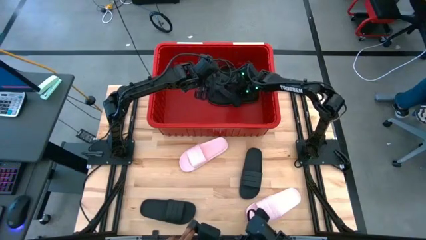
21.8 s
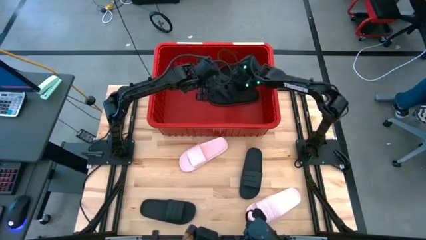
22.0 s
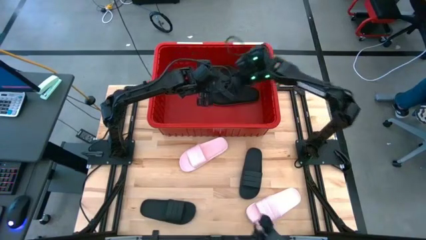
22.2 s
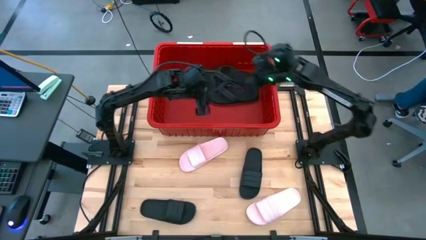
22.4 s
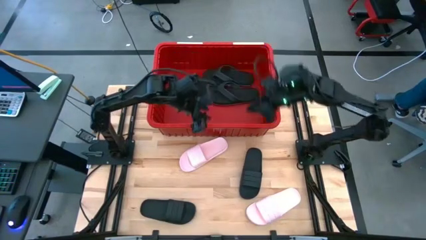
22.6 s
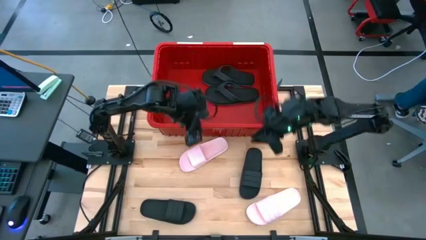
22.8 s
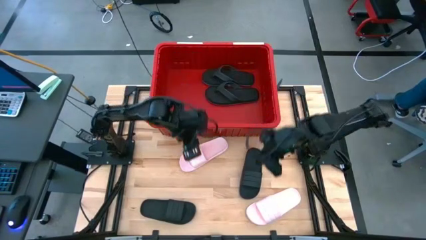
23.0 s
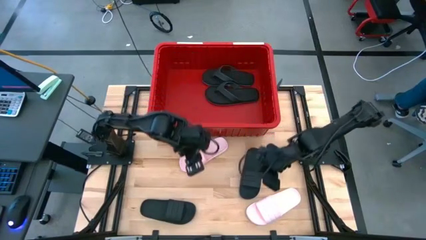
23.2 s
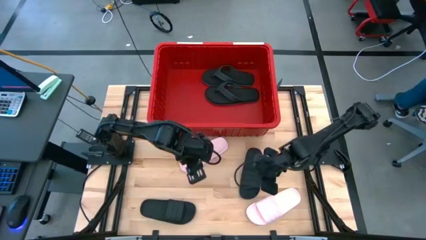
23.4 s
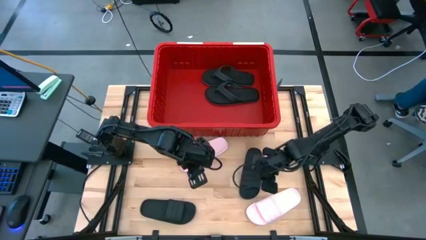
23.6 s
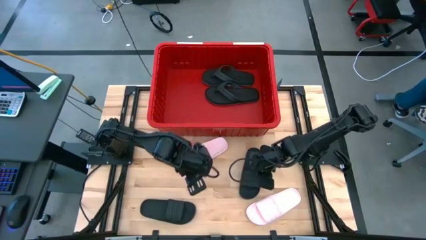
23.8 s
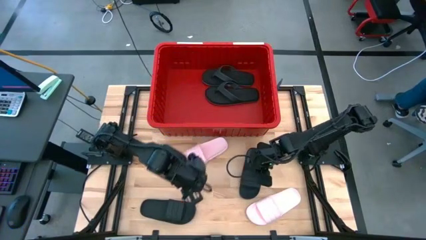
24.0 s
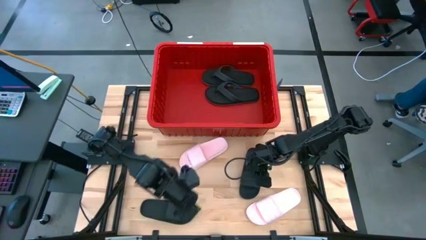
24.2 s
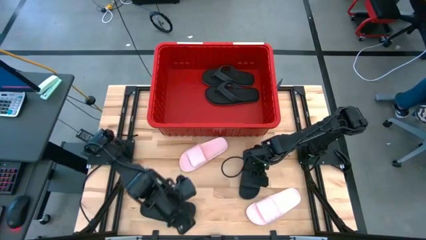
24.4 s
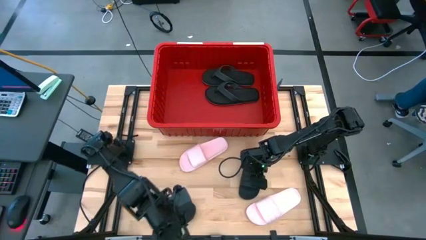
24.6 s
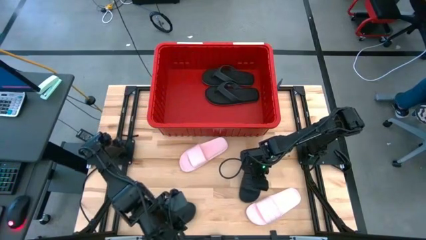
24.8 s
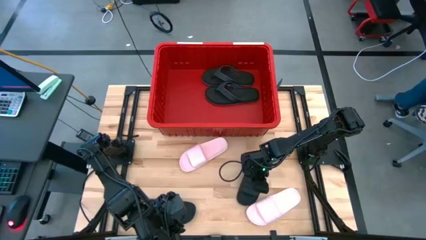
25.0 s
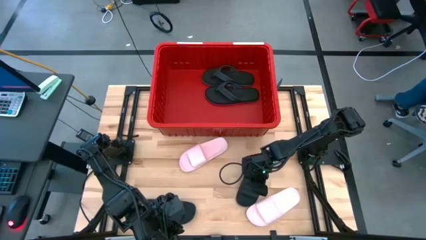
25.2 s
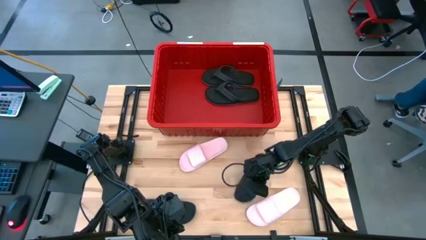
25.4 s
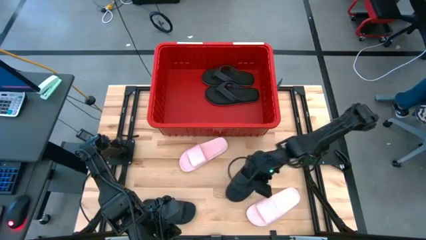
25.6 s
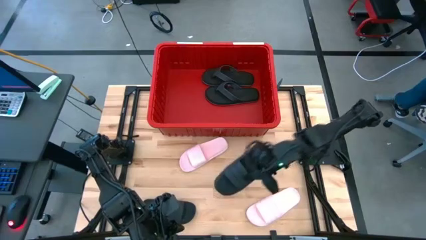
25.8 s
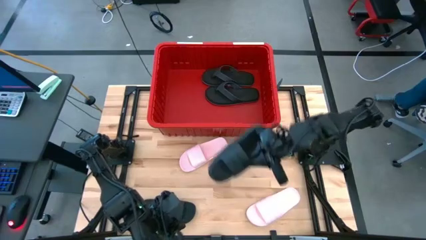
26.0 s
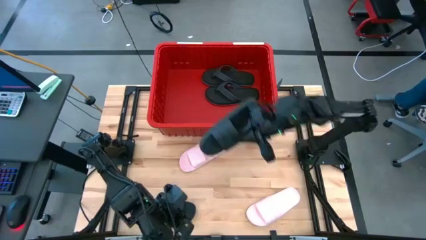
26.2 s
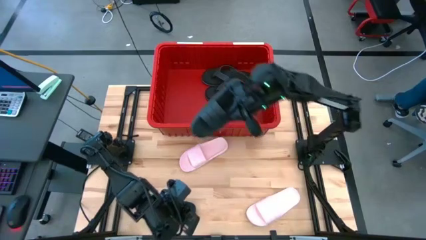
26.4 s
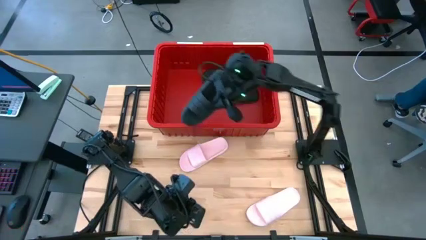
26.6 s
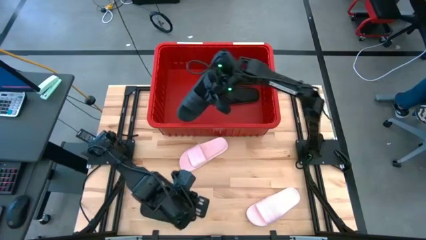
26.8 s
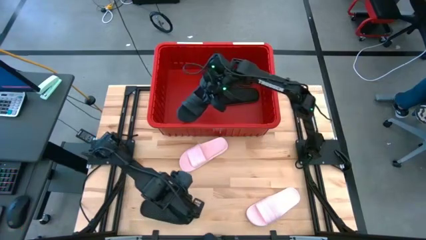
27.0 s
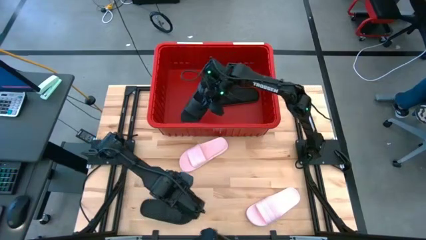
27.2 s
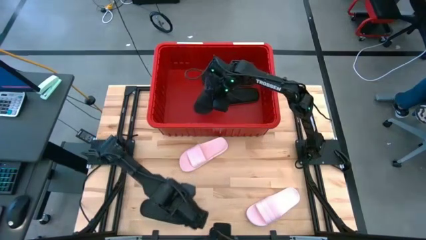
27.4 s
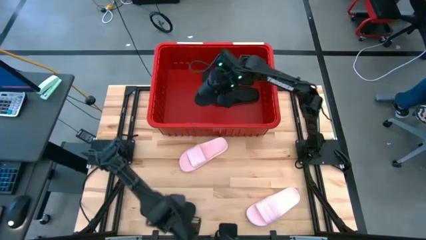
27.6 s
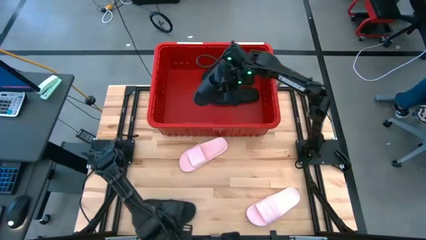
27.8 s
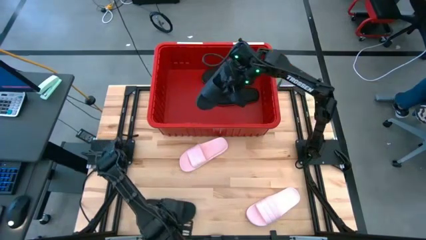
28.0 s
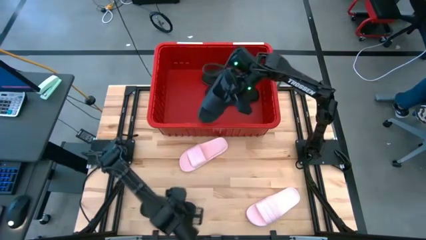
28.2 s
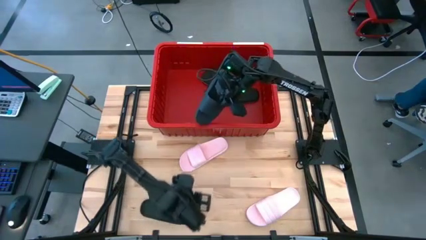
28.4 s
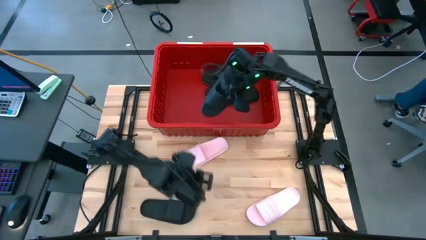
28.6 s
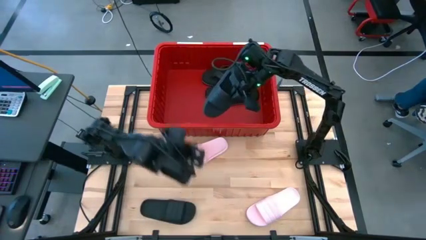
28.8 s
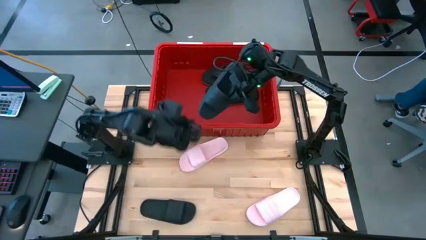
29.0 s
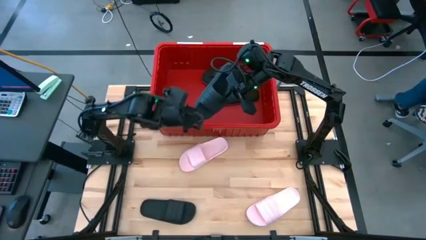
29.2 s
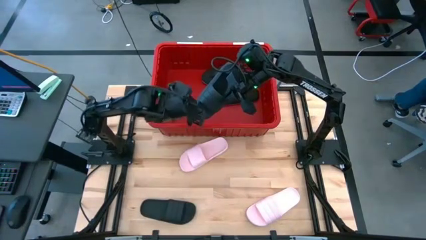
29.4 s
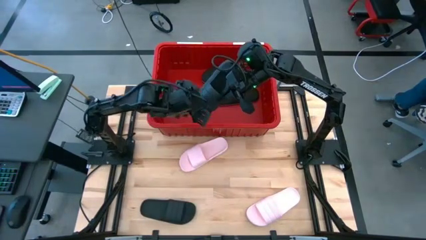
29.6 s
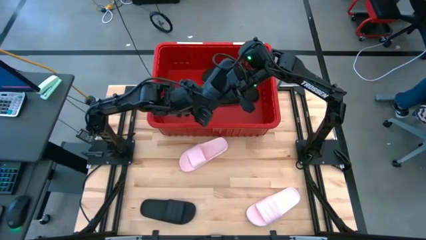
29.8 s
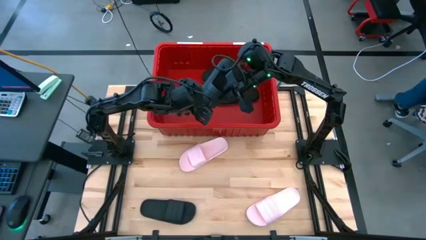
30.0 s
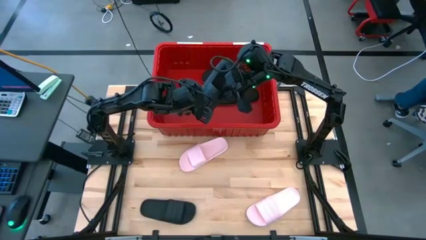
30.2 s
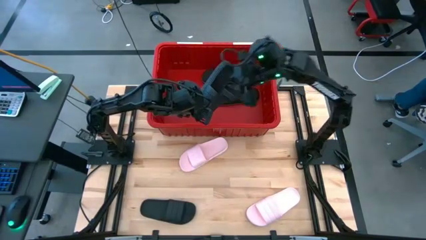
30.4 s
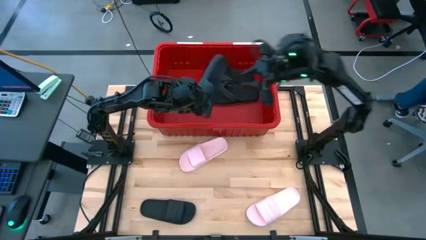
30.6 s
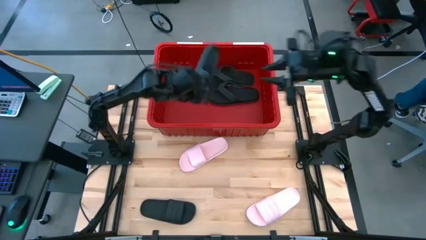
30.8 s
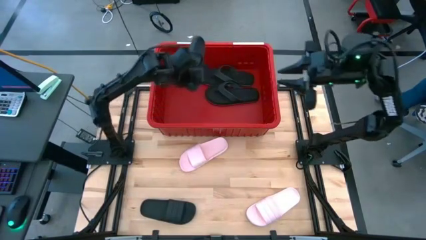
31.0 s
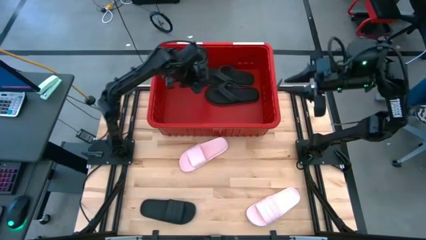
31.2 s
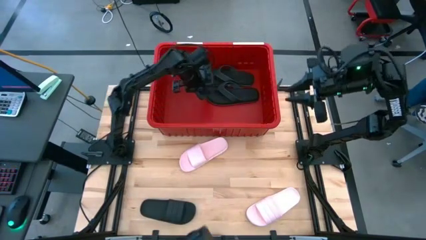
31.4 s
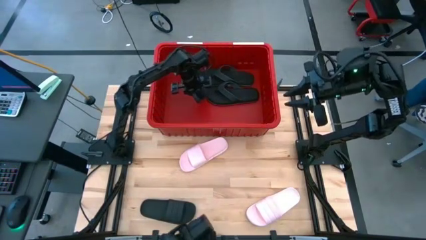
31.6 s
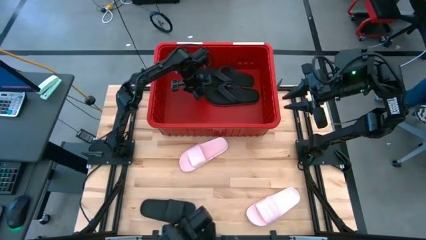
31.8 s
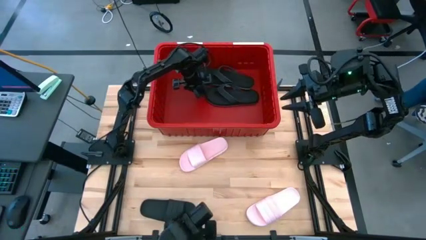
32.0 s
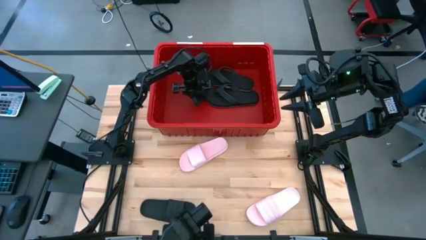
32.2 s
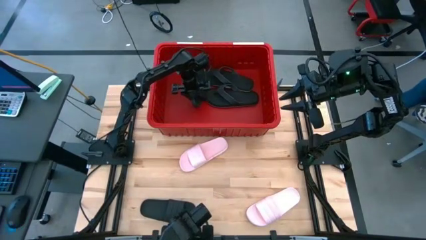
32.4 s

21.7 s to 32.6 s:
Task: Pick and place slides into bin
Put the right black slide into the red bin

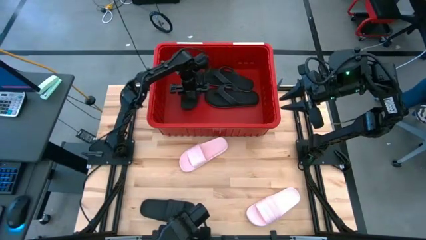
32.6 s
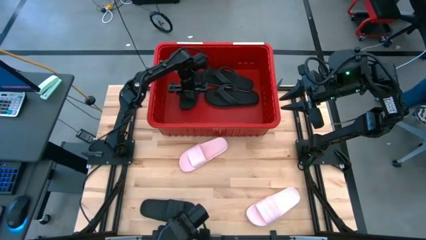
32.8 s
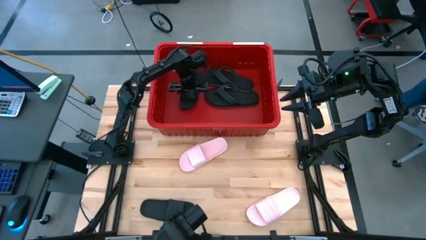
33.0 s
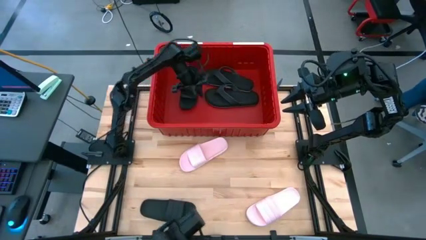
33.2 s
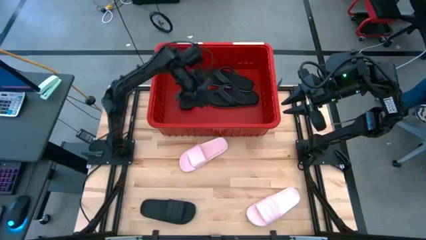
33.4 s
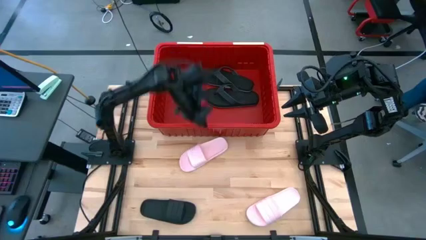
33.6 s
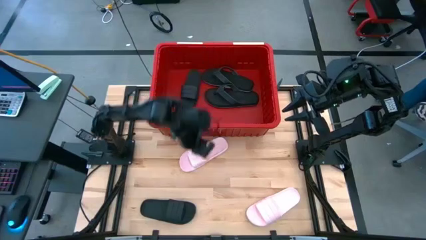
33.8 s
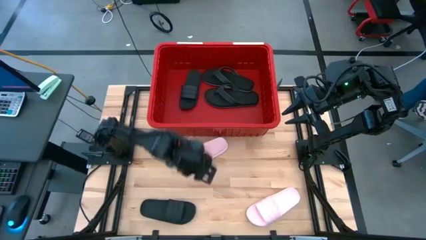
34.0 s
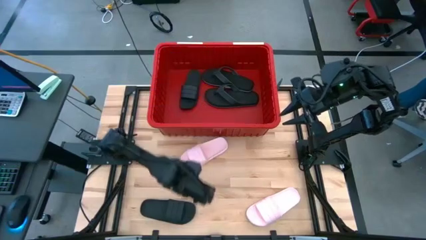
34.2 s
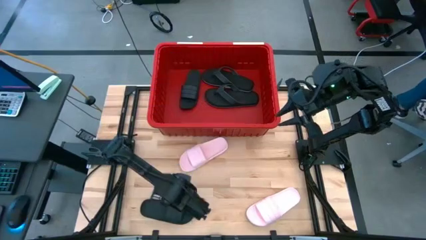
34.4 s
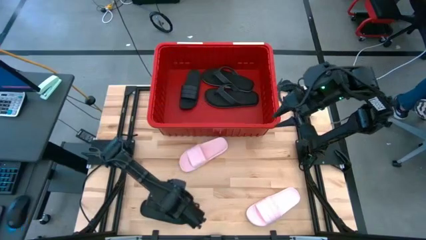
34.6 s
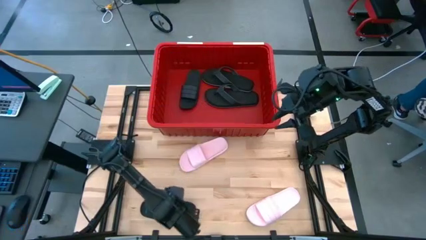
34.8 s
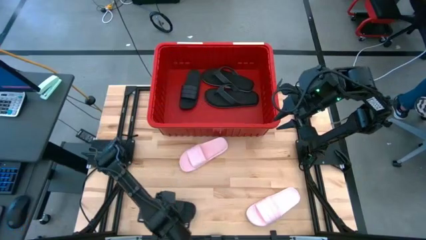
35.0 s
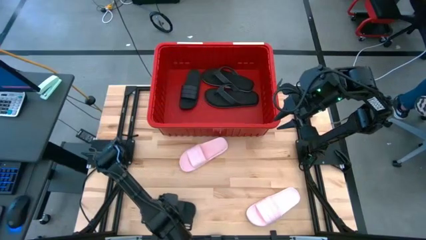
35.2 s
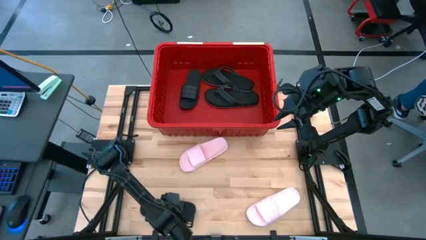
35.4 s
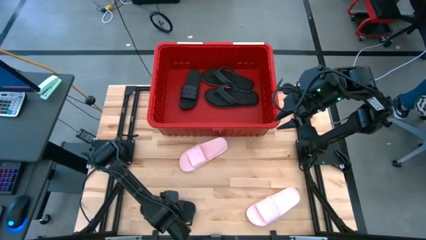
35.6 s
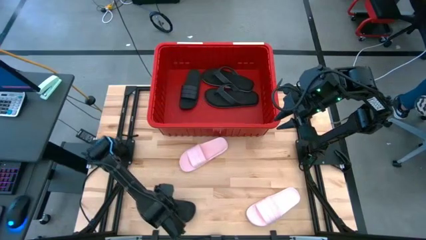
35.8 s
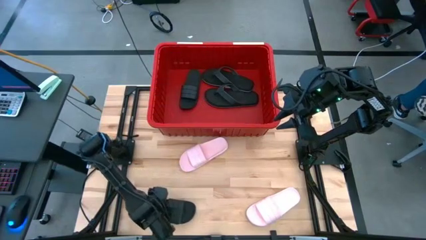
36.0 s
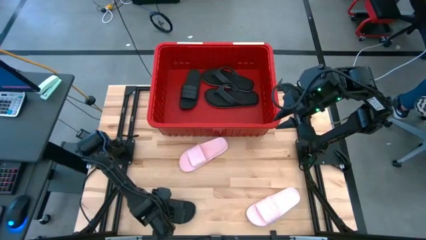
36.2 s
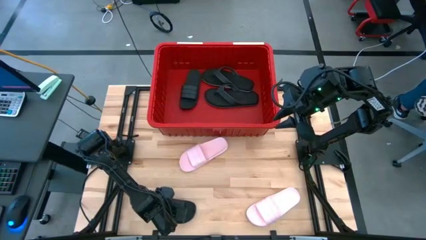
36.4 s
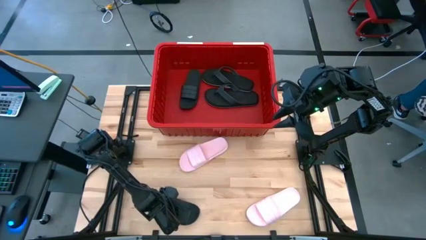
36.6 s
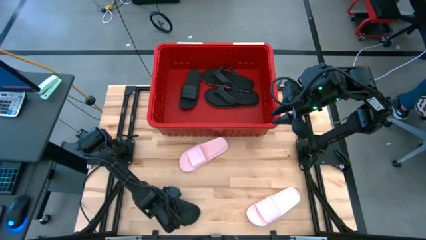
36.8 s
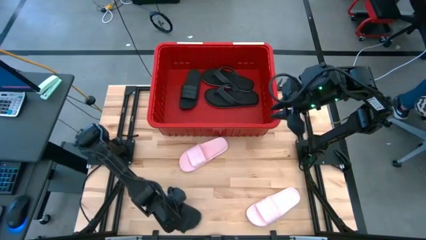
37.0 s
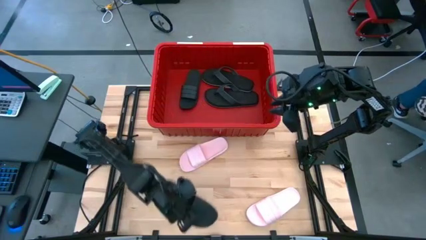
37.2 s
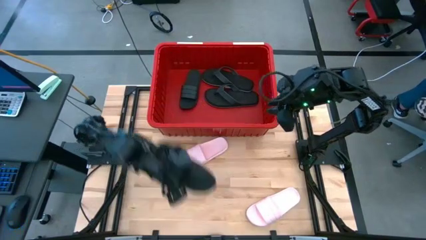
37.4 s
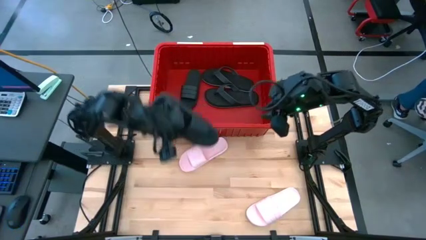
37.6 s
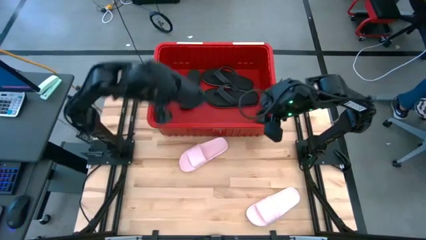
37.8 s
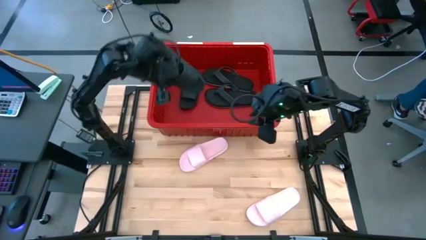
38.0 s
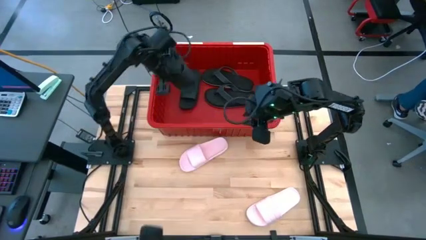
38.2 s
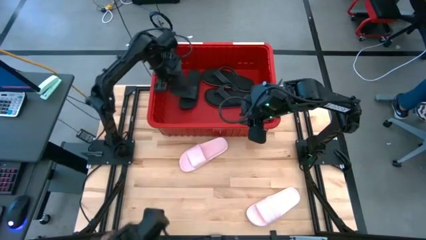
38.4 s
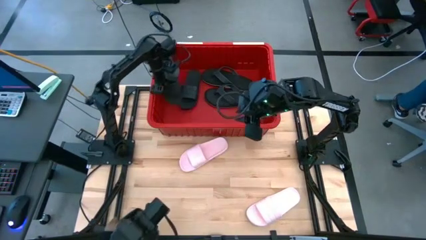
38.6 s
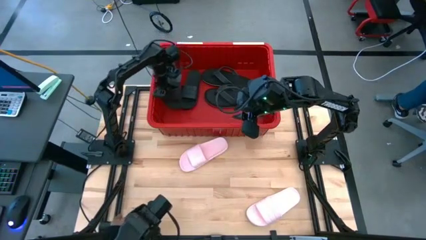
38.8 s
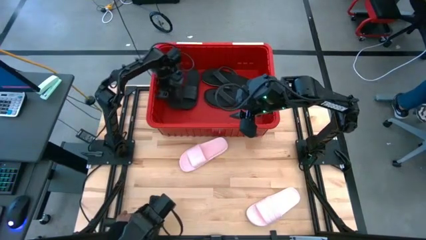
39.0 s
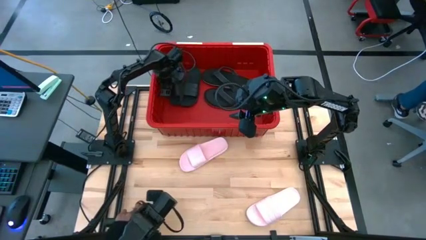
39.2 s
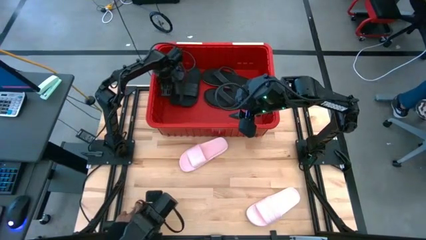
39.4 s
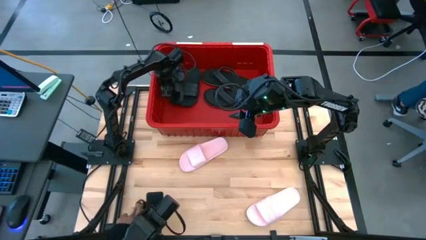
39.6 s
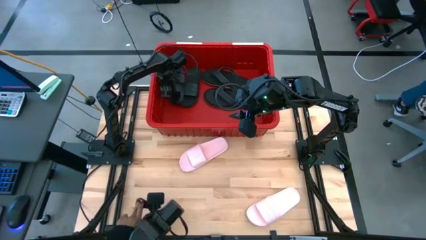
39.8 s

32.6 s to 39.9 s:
Put the black slide into the red bin
